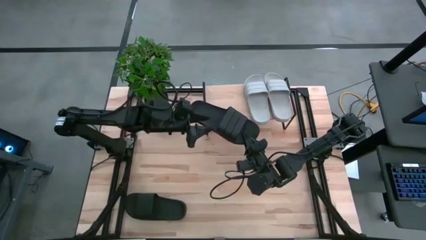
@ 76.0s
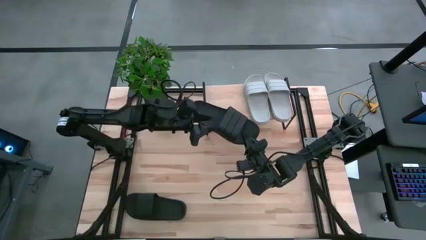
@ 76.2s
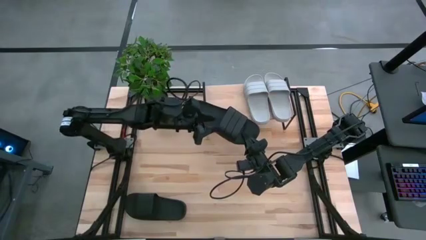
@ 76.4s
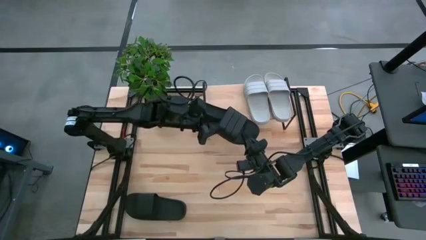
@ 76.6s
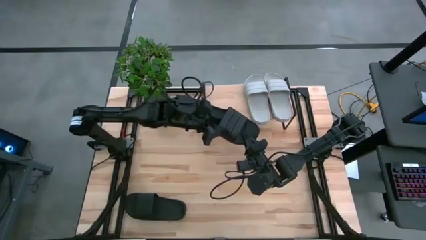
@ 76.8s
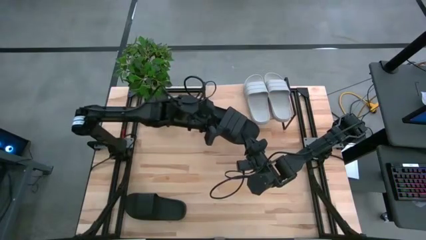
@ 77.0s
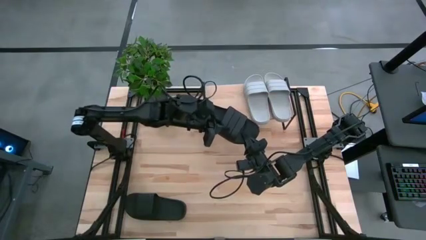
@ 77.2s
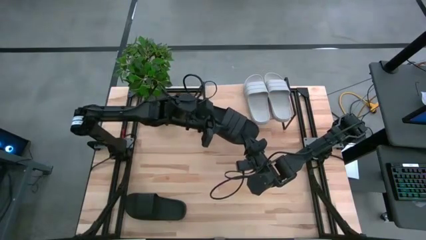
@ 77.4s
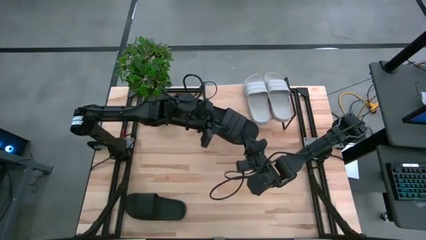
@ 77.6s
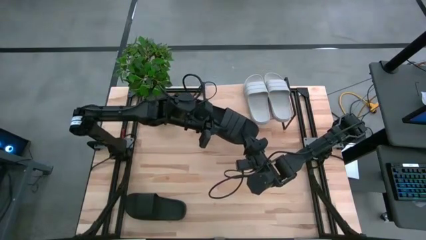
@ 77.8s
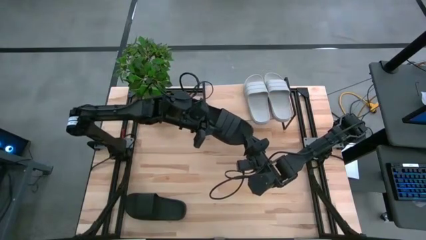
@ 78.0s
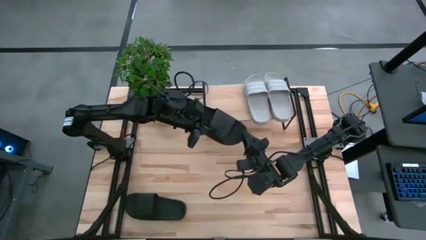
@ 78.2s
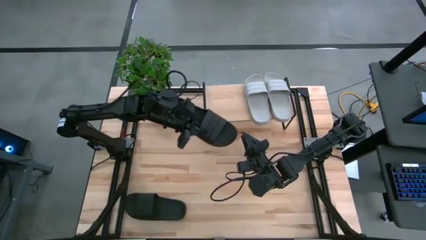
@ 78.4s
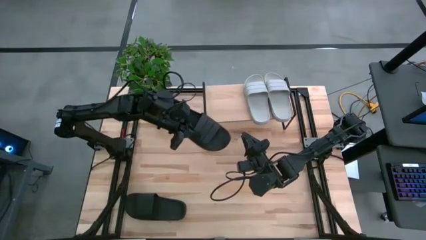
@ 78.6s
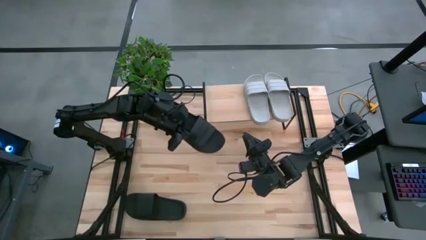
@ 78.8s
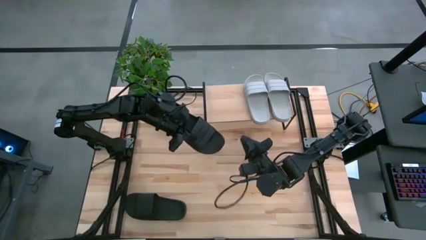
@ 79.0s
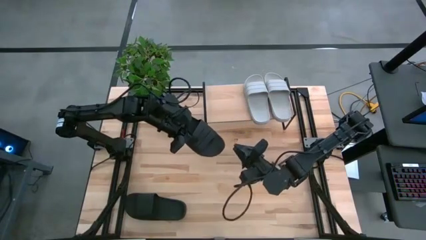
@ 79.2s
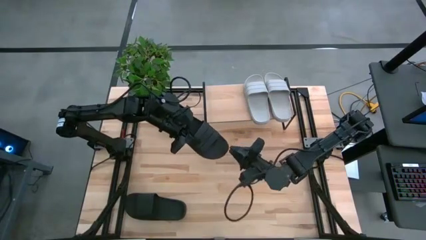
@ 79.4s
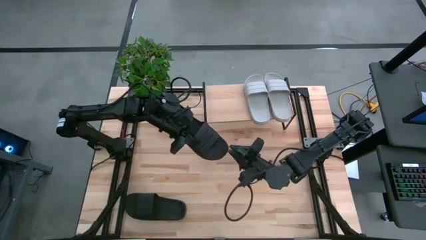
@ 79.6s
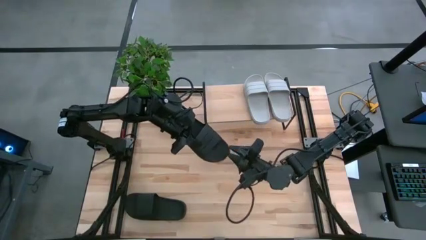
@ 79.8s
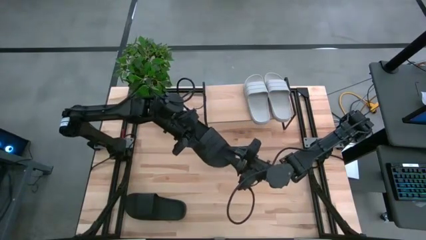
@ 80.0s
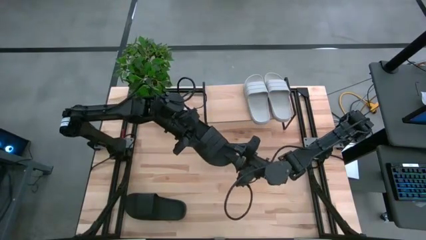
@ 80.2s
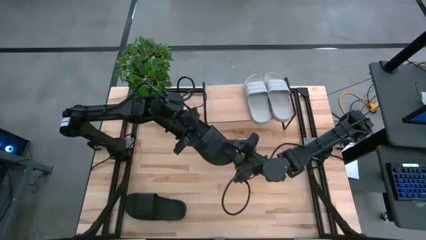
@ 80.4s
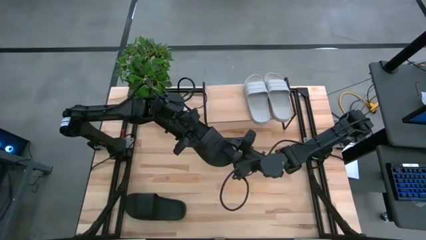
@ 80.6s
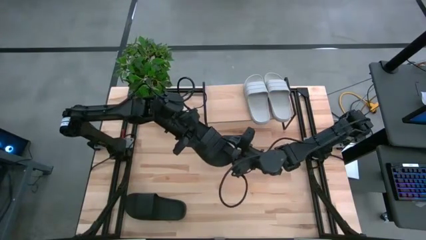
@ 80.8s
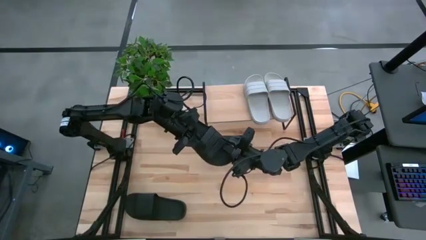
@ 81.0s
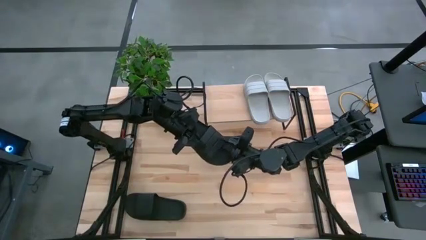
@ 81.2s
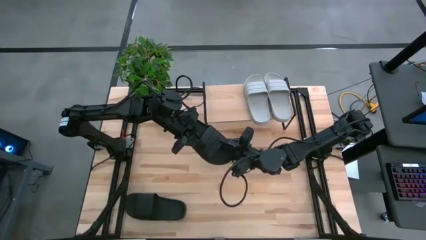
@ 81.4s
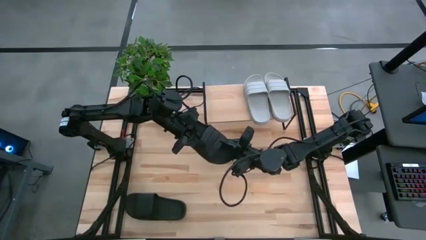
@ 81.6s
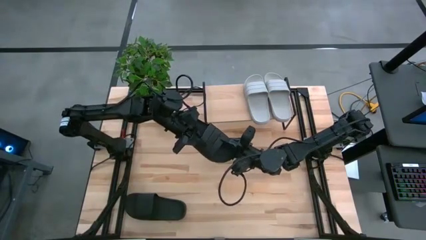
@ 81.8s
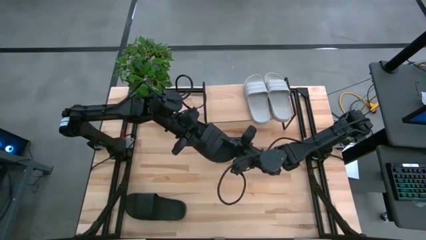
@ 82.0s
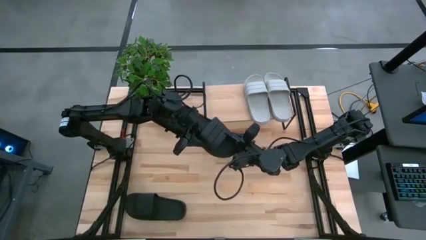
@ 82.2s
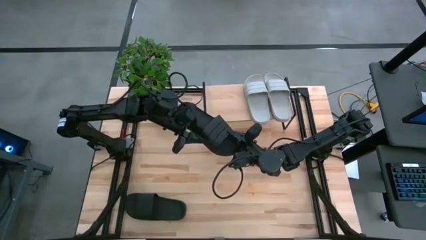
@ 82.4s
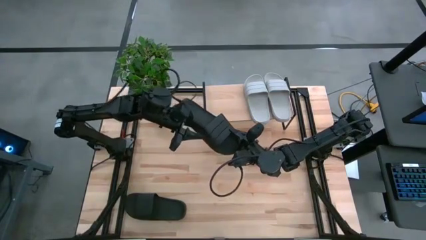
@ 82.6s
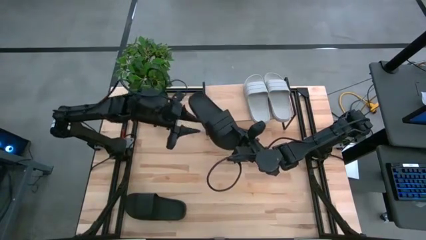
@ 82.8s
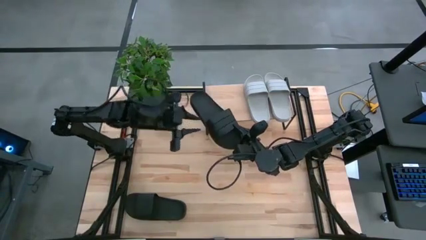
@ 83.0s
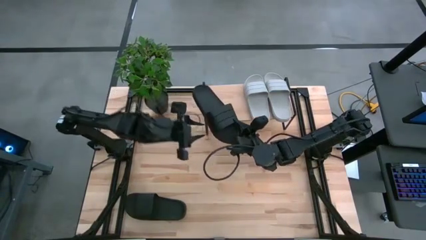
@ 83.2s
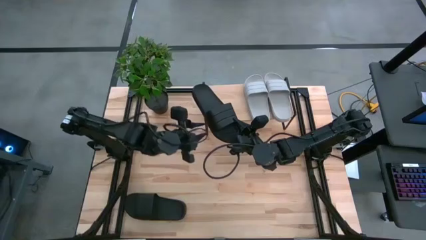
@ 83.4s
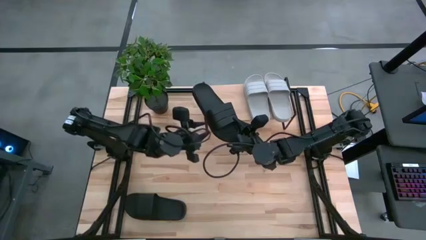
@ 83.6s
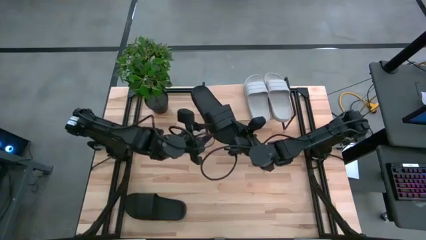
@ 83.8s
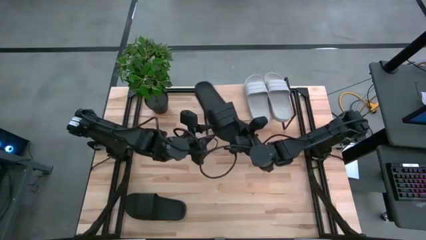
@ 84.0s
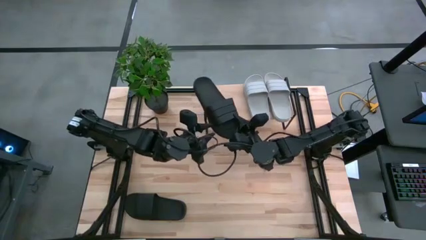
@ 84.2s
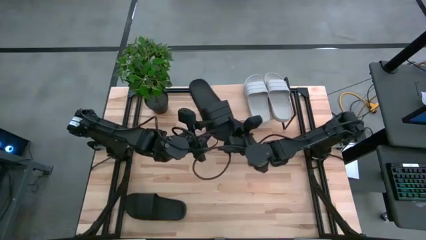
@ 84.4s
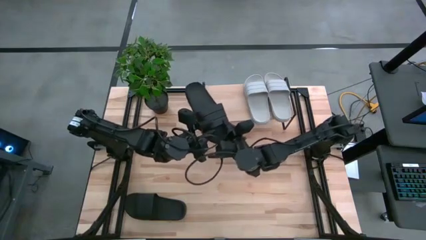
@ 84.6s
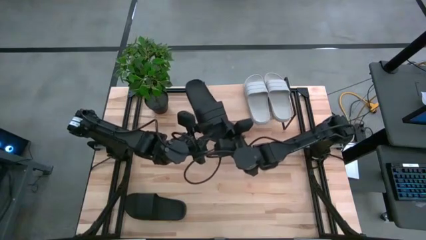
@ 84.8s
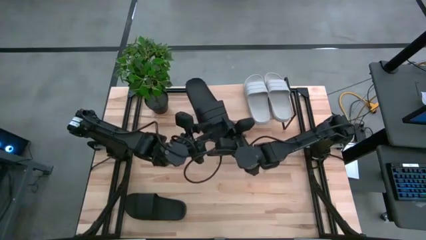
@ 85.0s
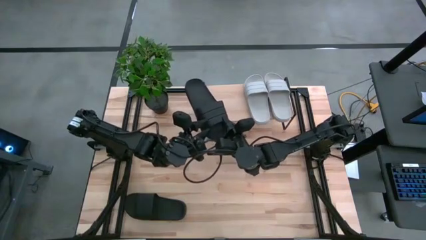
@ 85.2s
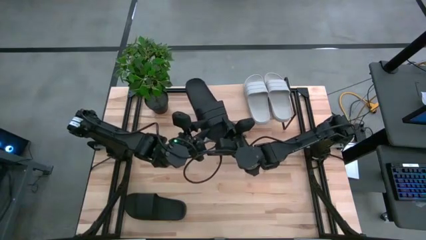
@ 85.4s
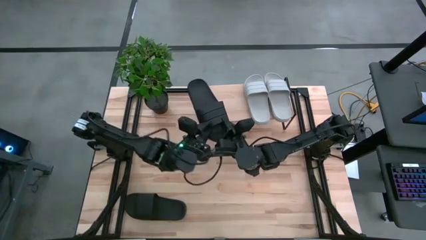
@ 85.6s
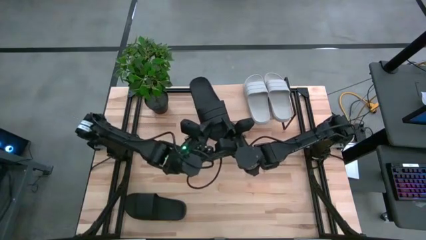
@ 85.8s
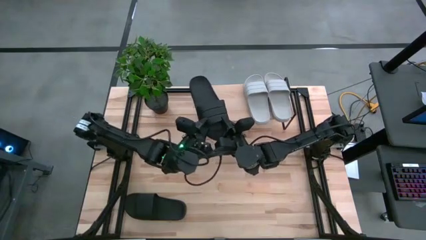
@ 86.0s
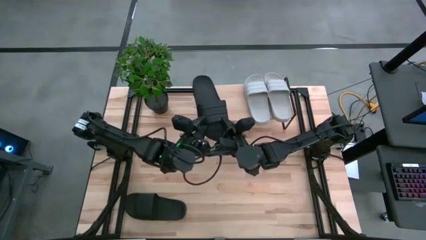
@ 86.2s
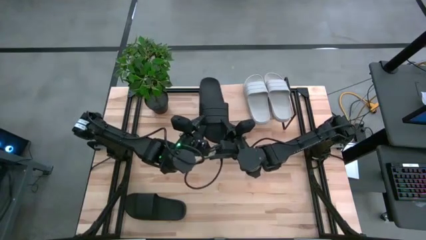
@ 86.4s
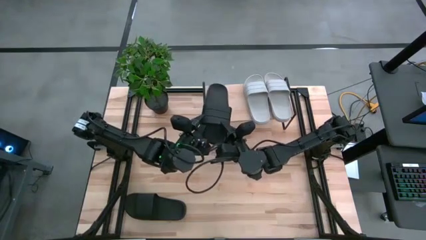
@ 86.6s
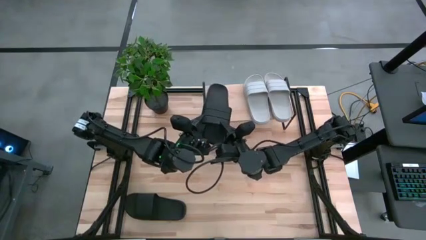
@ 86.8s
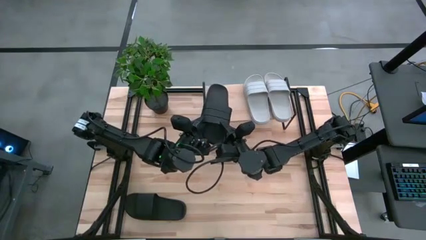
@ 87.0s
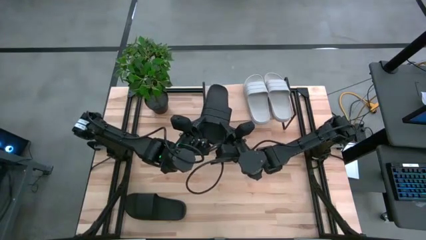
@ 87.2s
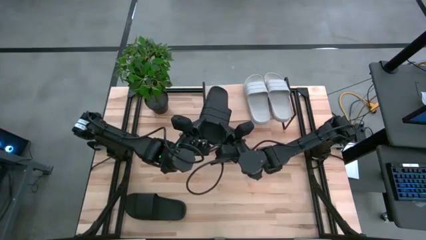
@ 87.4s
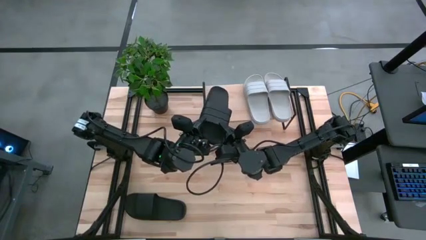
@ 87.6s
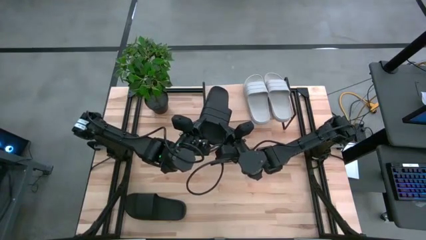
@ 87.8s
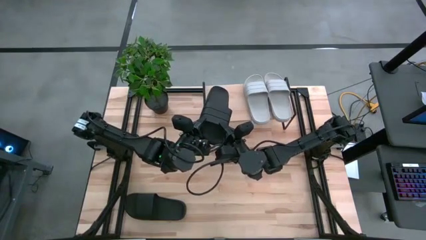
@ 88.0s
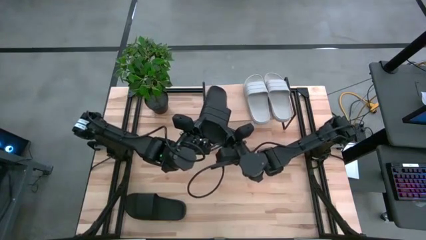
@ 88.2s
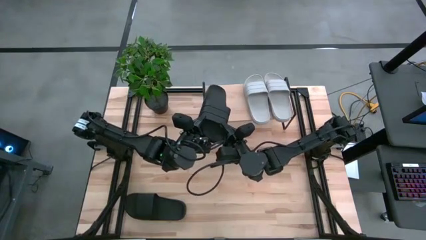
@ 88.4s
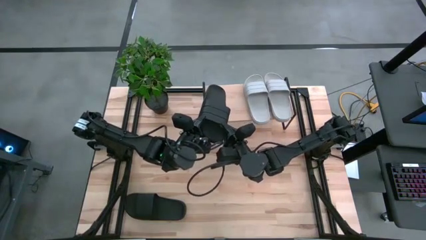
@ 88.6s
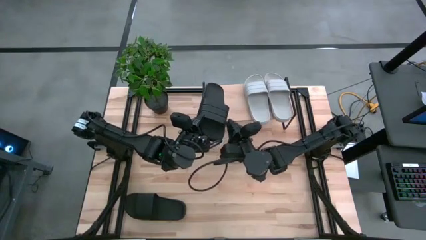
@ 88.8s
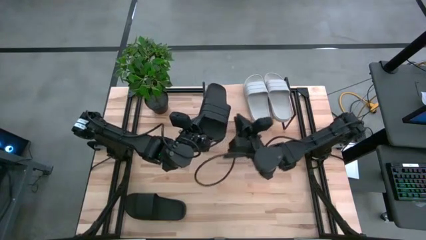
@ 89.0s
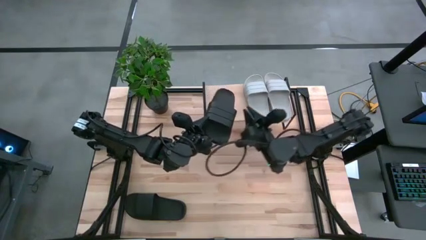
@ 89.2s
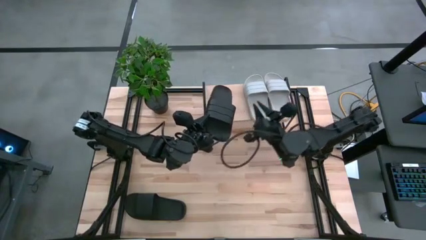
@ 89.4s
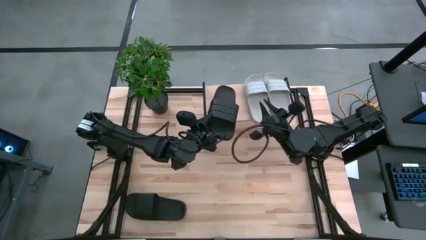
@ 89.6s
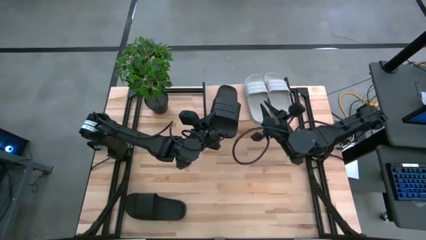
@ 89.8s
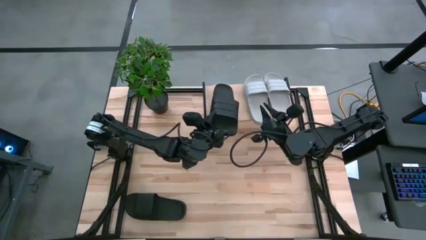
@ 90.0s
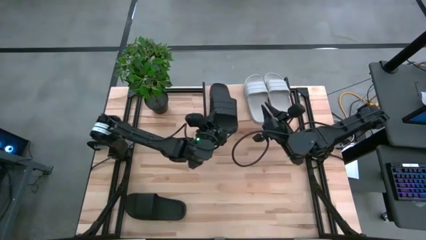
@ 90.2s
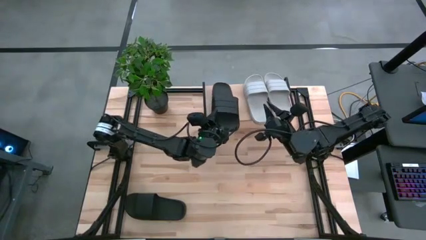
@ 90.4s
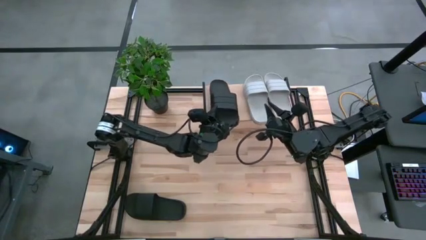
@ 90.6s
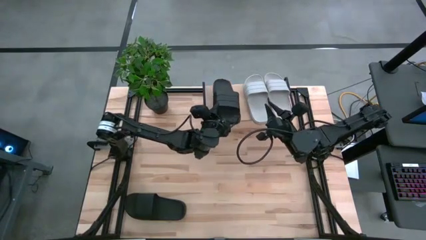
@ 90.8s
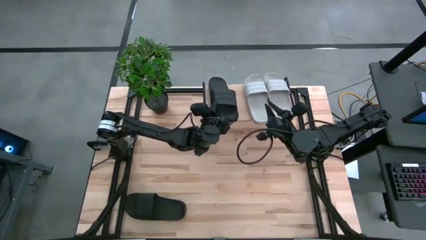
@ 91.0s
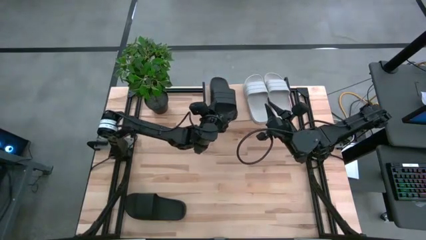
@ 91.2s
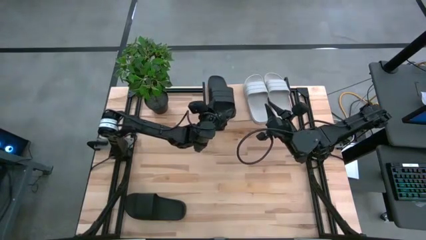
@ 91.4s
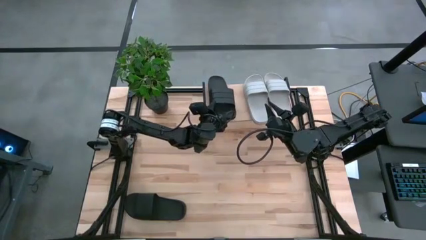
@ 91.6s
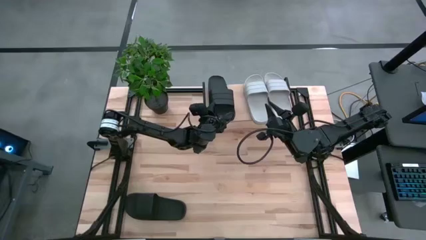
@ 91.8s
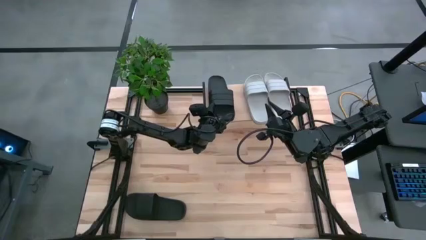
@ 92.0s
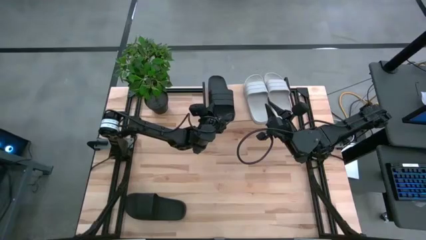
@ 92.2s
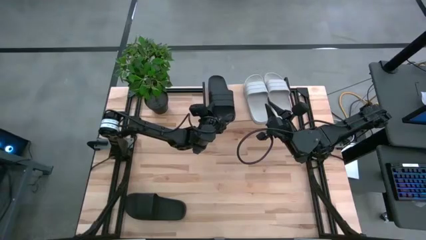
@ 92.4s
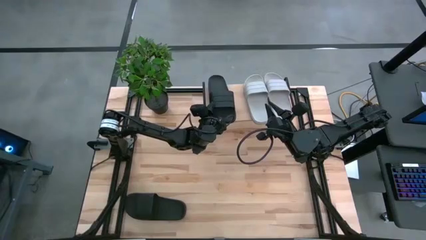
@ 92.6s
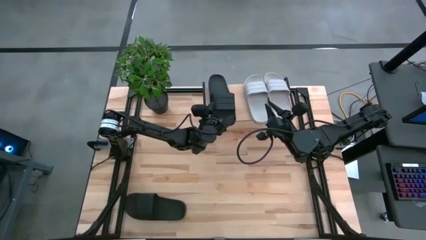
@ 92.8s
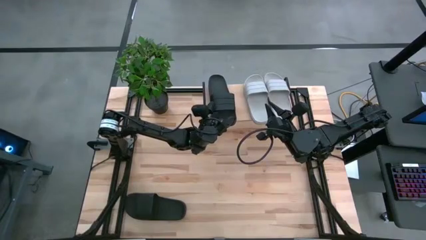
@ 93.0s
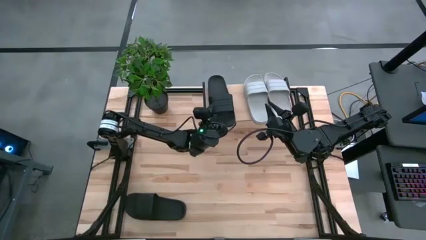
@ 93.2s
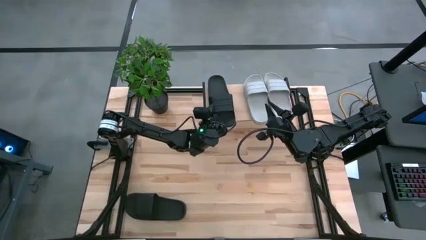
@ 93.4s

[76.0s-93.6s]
Task: Pick and place slides into the shelf
Put the top black slide on the shelf
